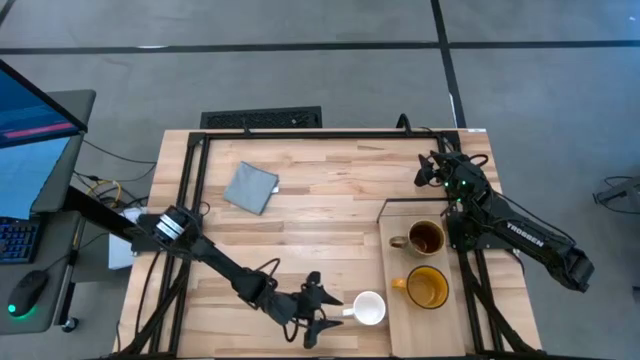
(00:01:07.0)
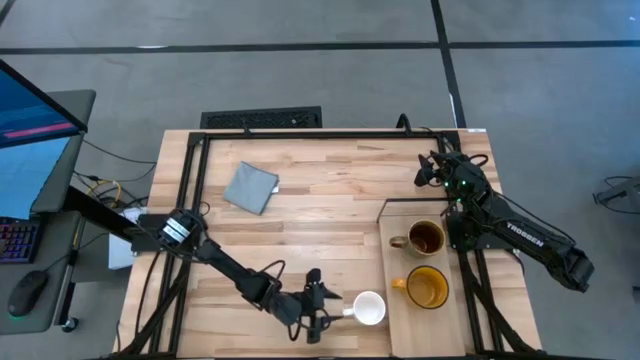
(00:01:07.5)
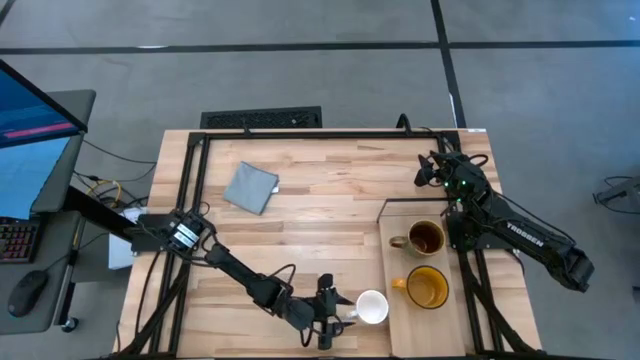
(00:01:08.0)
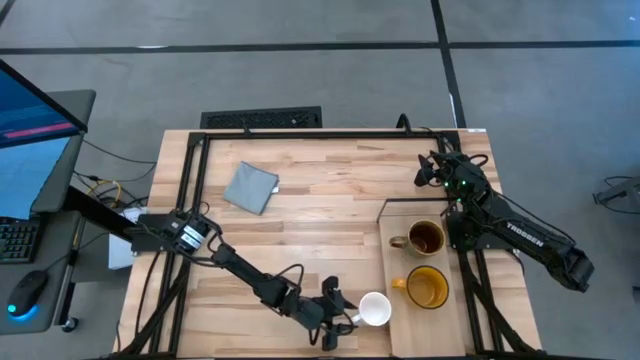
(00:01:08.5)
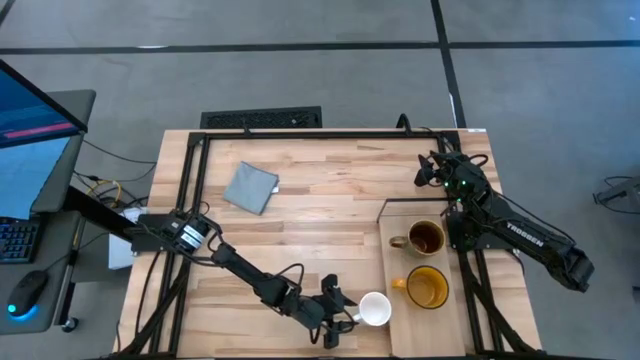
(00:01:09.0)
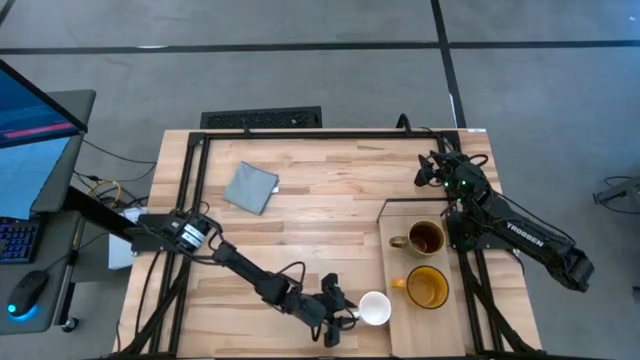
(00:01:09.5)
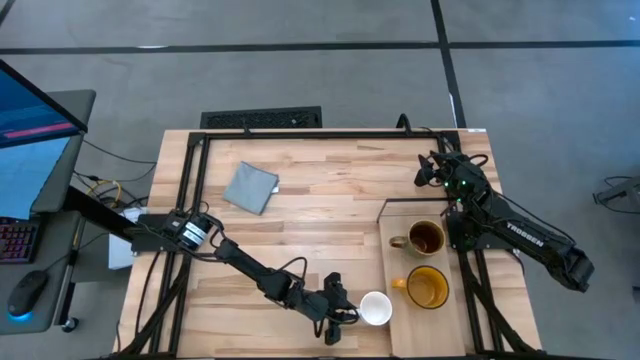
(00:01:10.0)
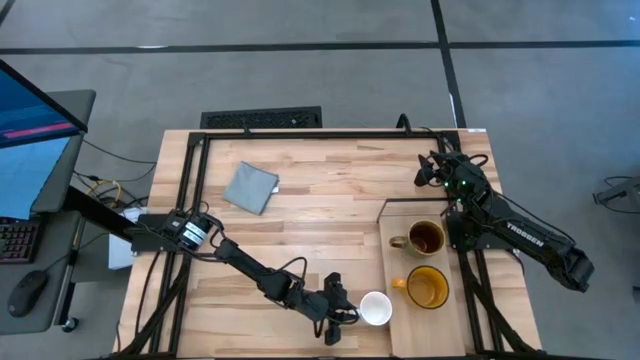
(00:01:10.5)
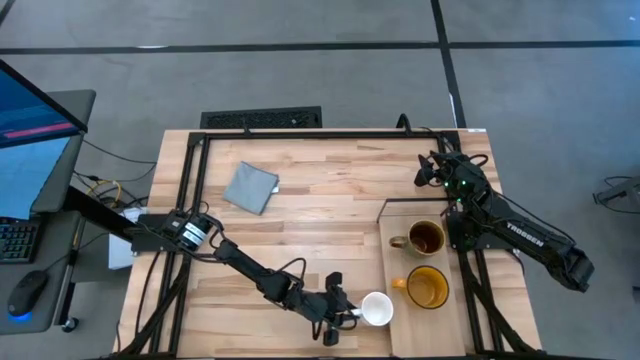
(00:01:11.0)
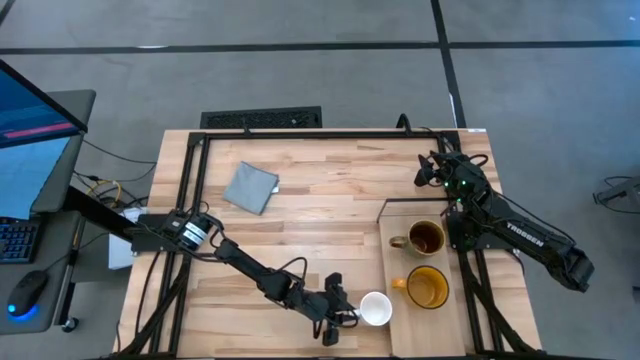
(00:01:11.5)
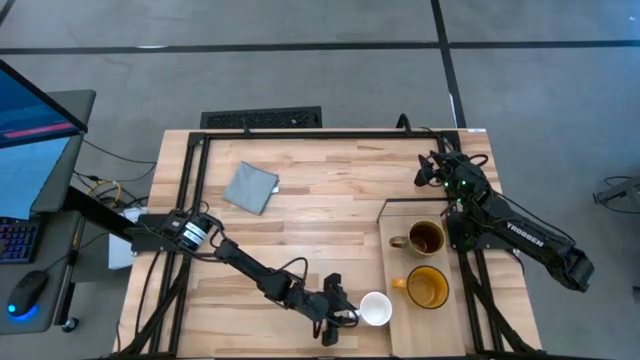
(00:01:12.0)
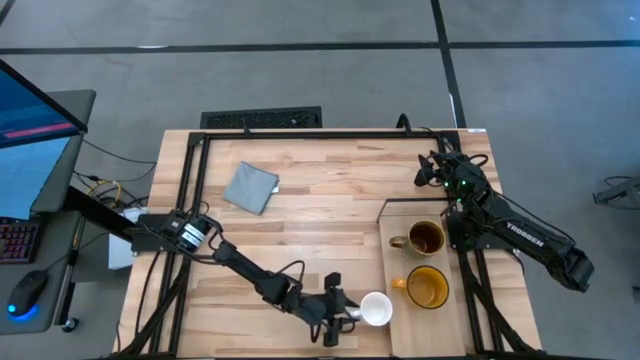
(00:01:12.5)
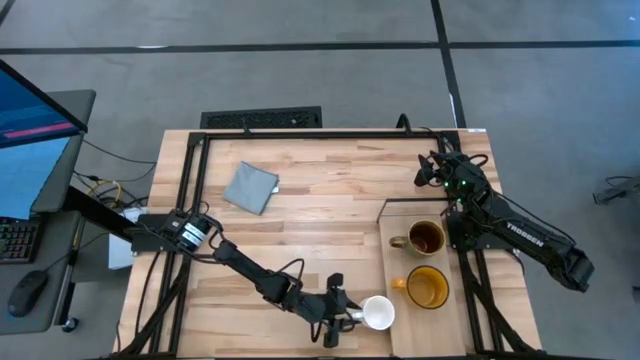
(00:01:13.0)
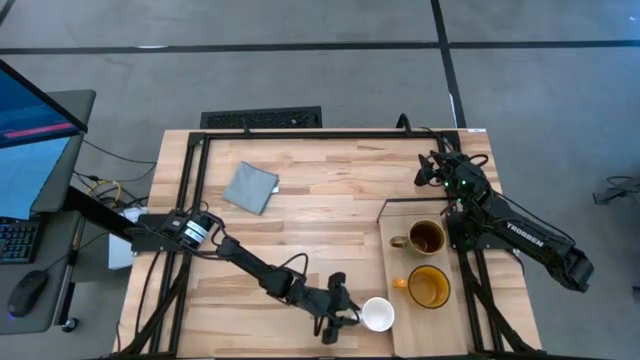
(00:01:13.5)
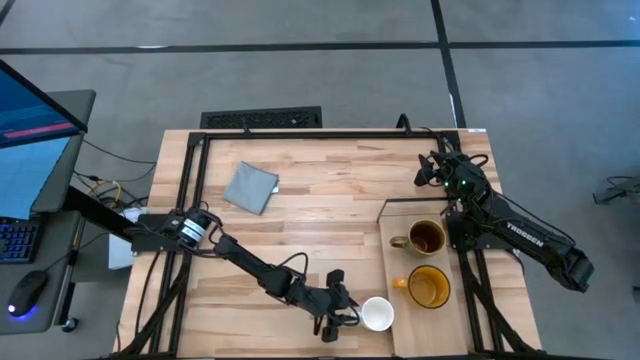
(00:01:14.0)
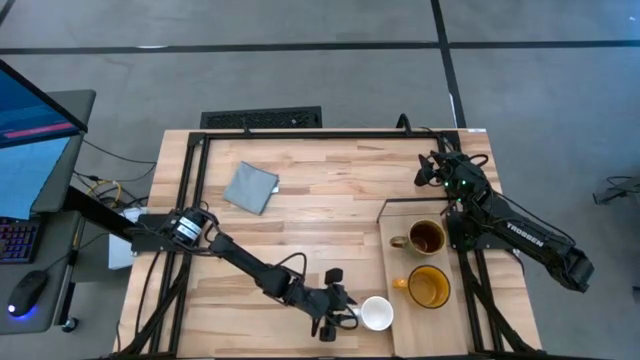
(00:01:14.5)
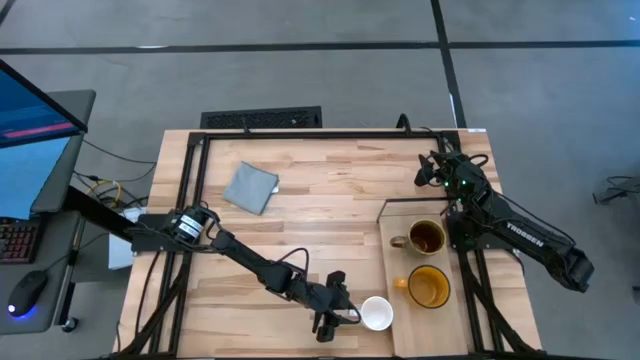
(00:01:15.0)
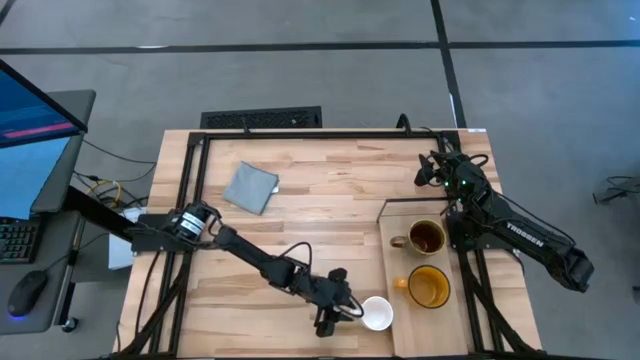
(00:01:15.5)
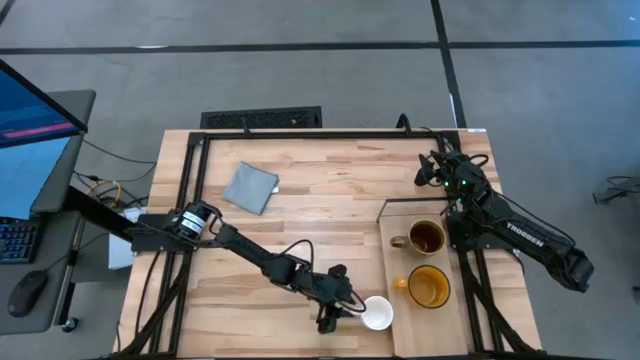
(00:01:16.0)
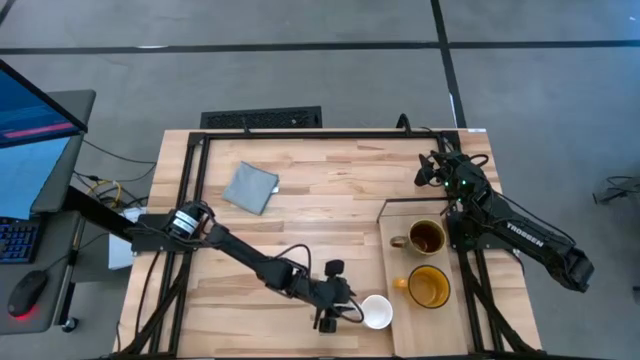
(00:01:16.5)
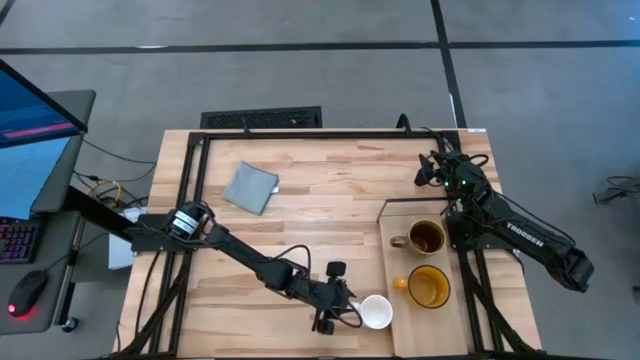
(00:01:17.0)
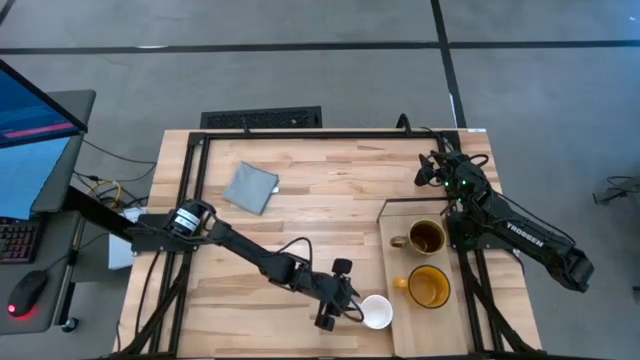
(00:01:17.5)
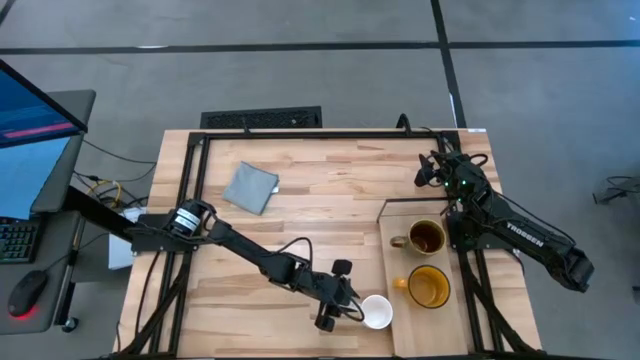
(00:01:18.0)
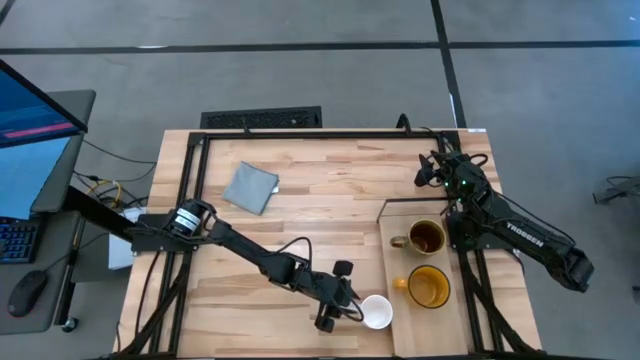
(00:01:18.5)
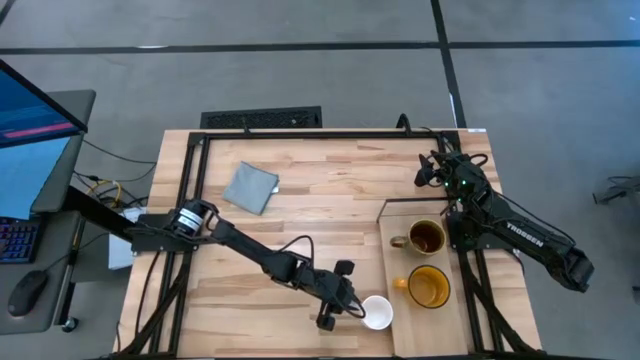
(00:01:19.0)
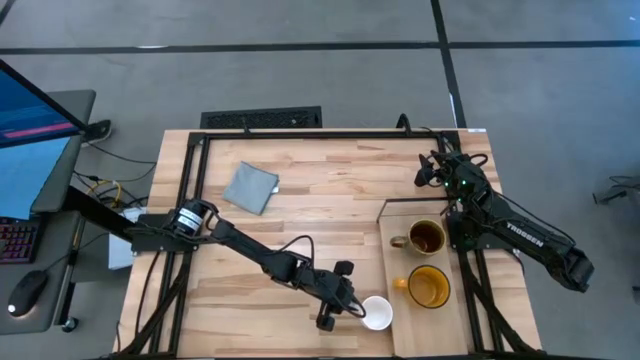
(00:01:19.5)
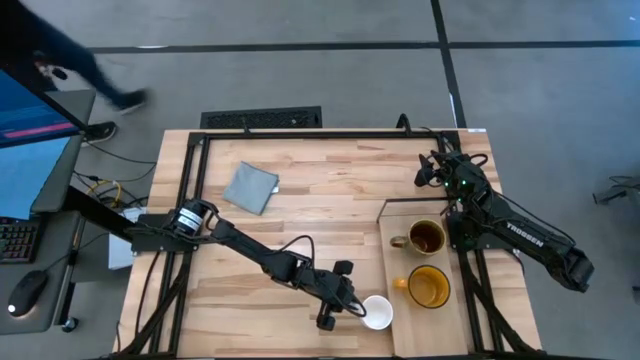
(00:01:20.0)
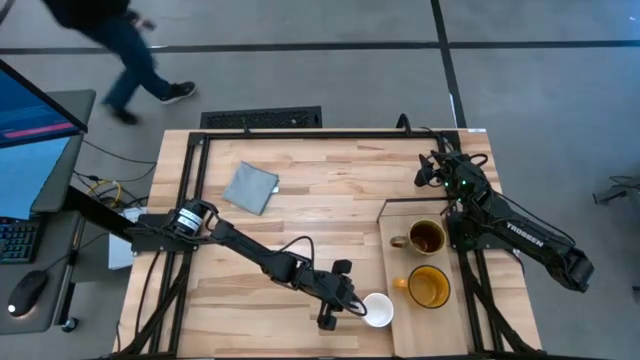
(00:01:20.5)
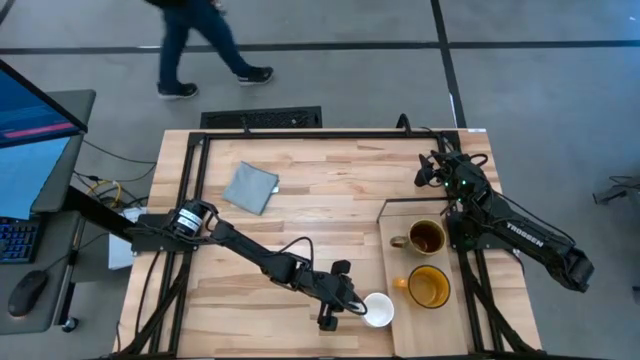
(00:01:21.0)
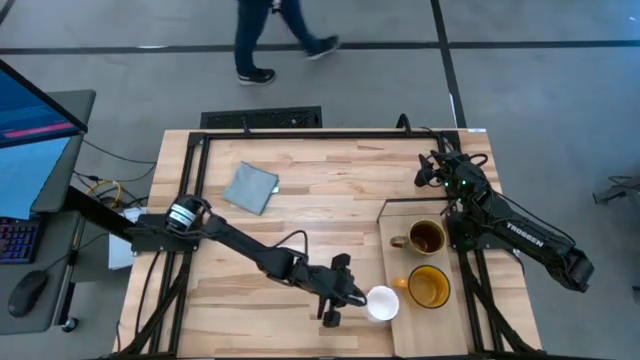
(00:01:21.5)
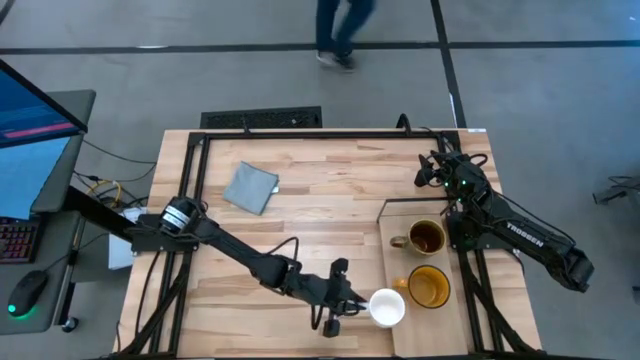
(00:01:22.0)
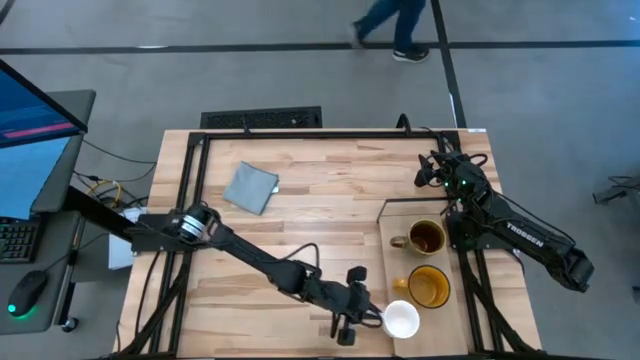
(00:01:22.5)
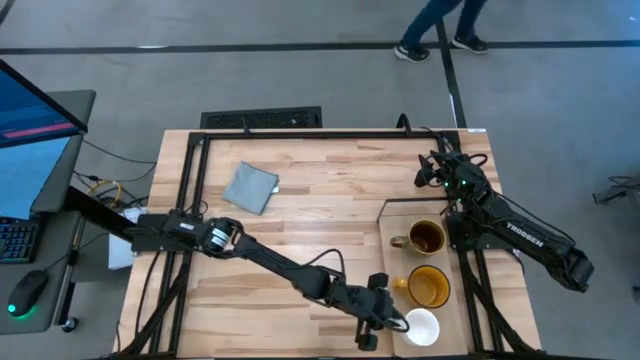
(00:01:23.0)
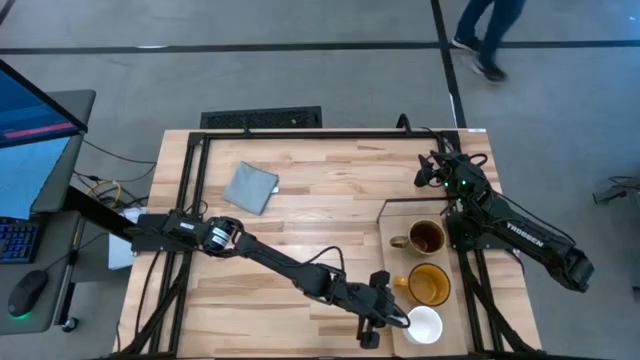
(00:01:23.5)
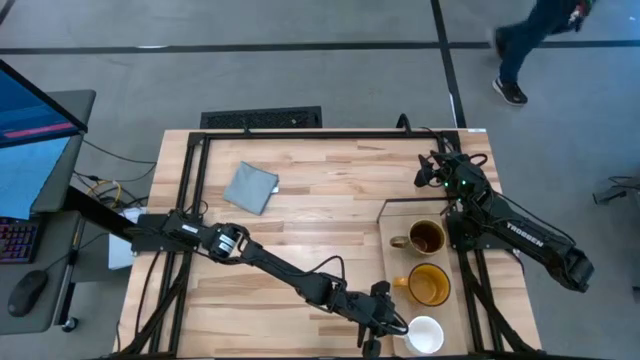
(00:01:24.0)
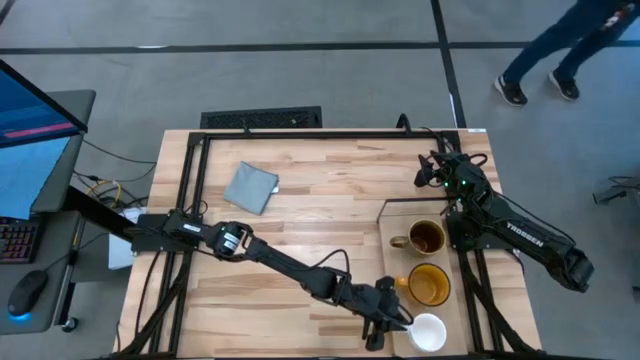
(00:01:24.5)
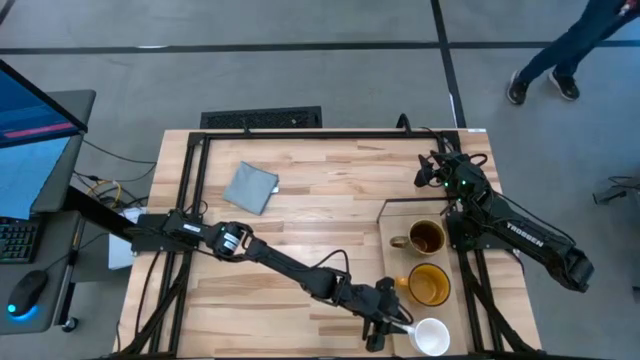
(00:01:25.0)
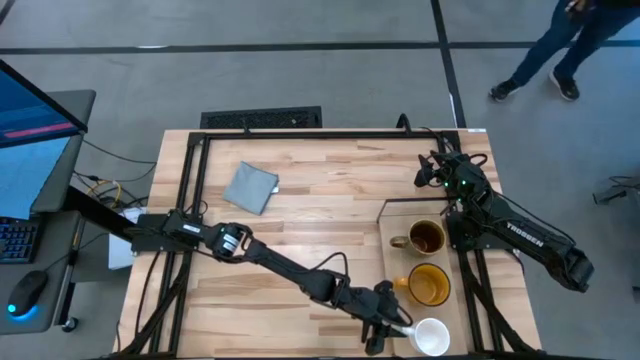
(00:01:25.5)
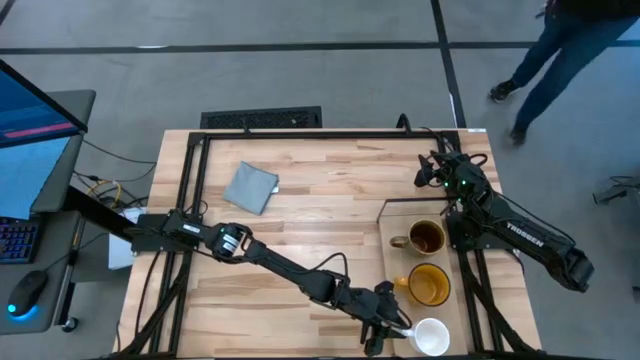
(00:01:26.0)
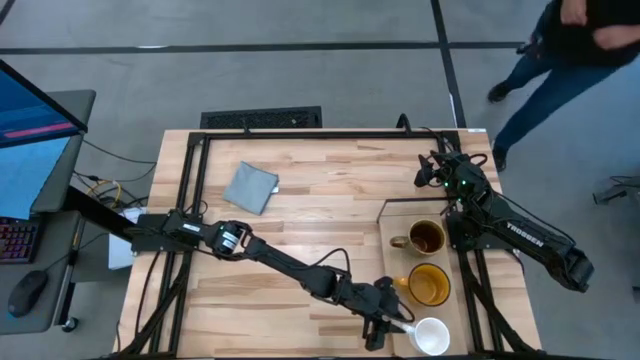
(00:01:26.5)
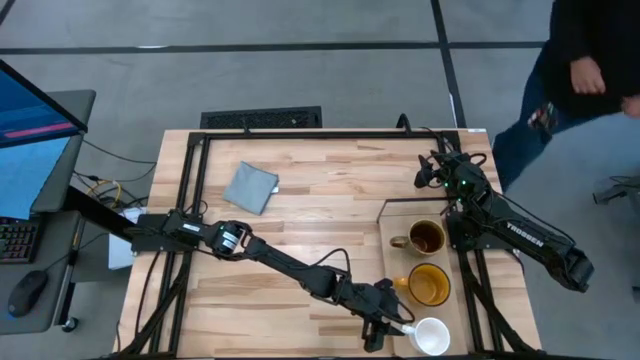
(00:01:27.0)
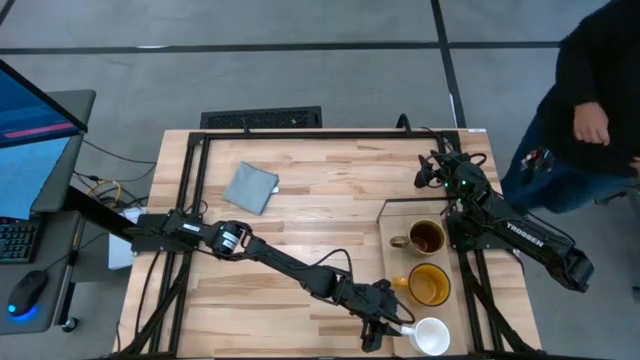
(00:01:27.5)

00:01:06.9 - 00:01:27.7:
Task: Stack small to large cups/mugs on shelf
Put the white mug on the shelf
